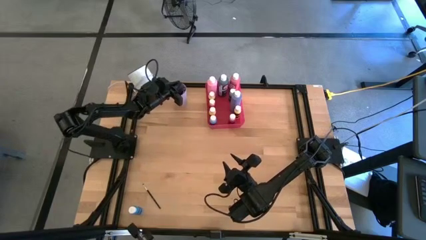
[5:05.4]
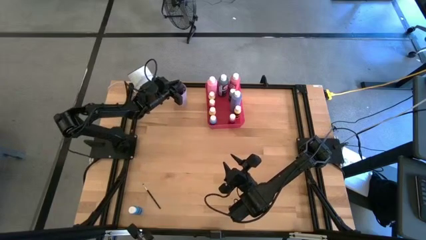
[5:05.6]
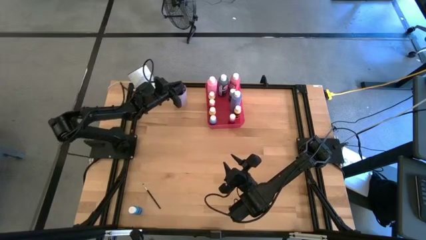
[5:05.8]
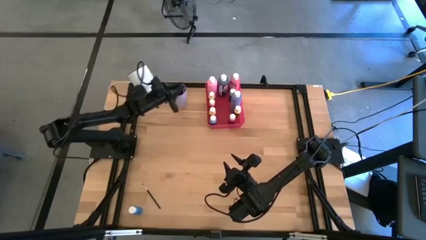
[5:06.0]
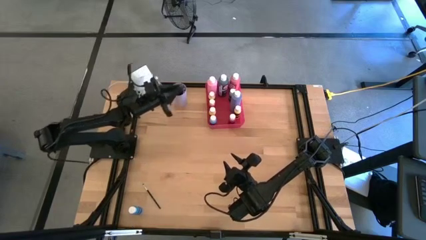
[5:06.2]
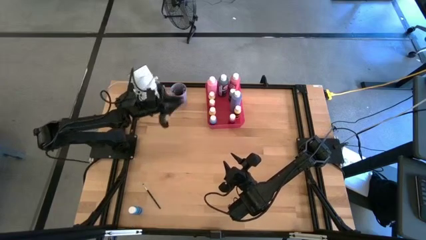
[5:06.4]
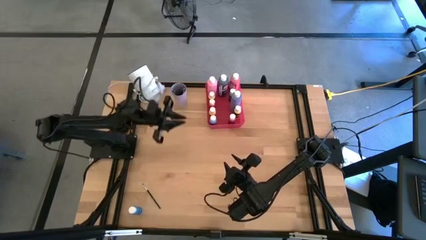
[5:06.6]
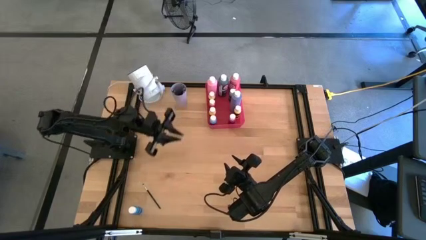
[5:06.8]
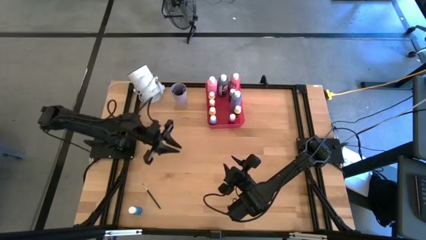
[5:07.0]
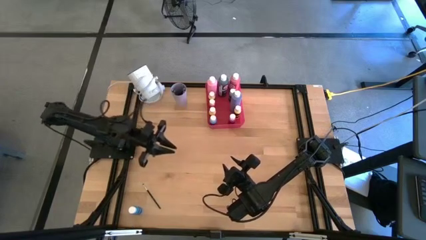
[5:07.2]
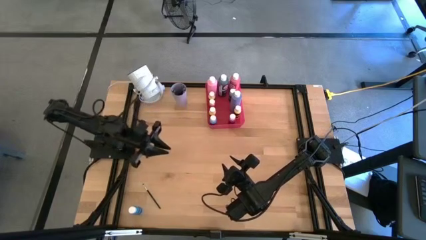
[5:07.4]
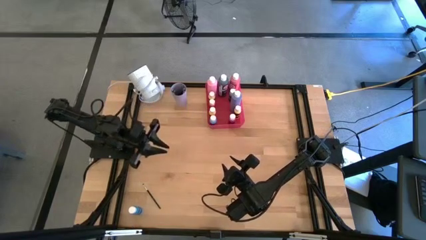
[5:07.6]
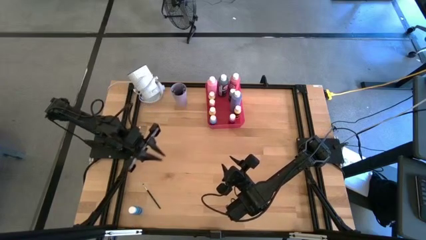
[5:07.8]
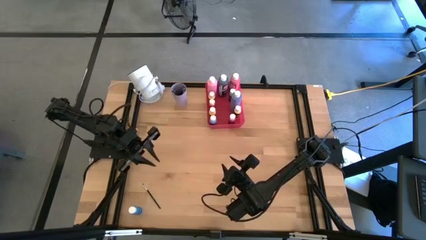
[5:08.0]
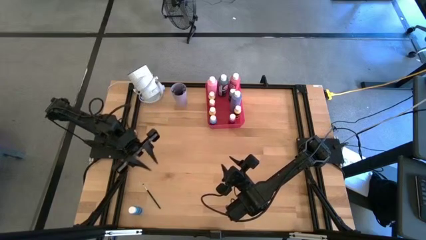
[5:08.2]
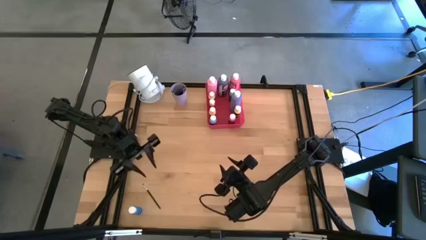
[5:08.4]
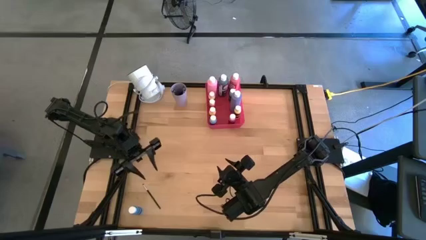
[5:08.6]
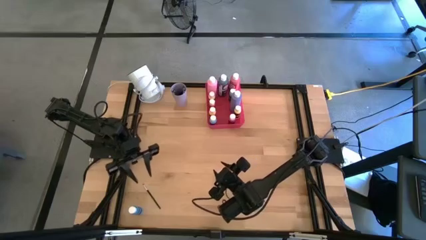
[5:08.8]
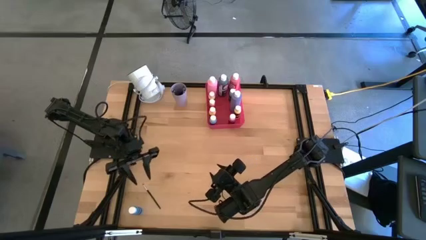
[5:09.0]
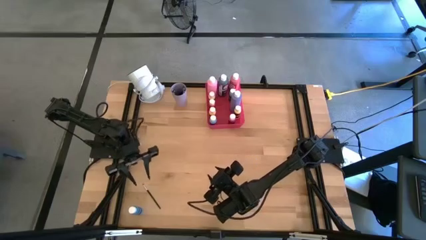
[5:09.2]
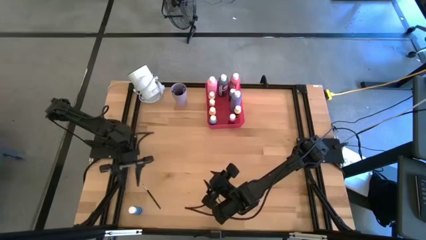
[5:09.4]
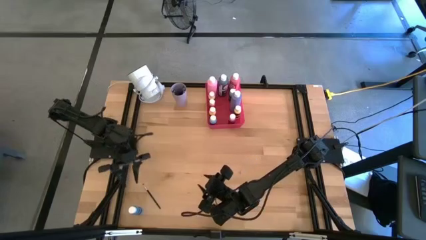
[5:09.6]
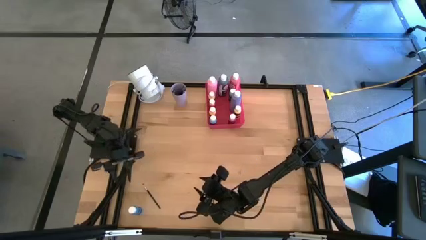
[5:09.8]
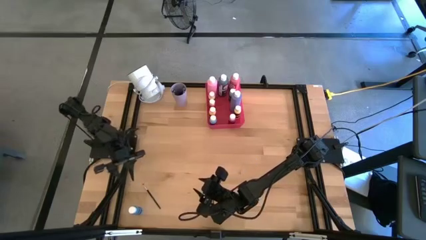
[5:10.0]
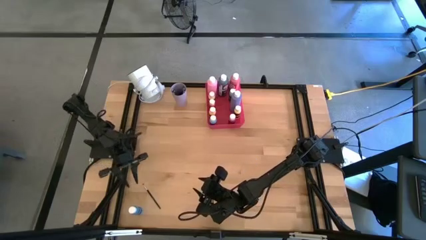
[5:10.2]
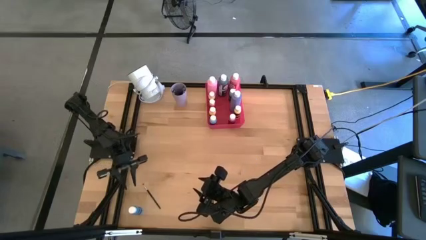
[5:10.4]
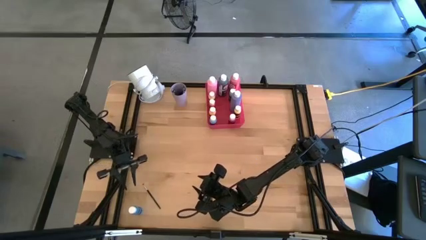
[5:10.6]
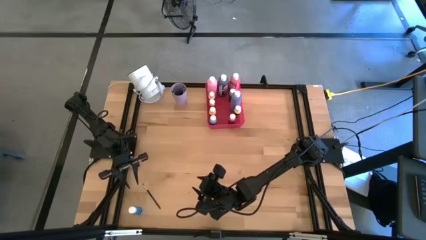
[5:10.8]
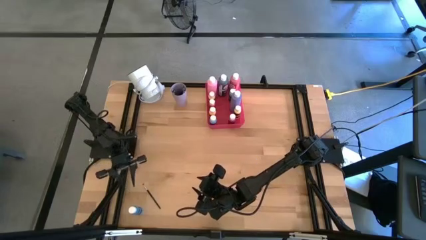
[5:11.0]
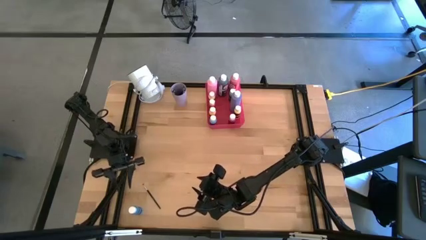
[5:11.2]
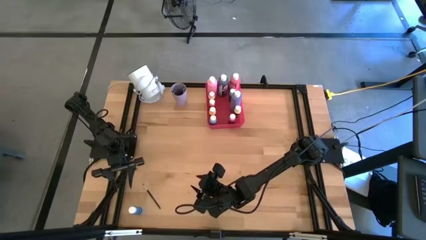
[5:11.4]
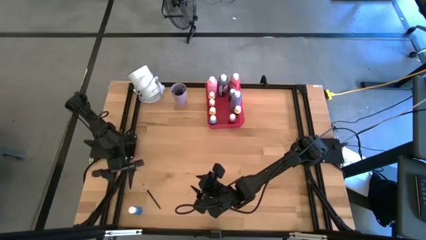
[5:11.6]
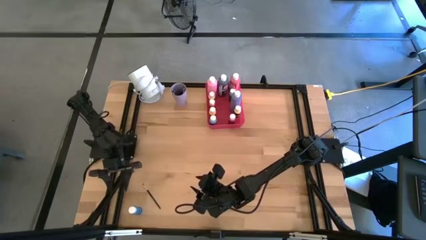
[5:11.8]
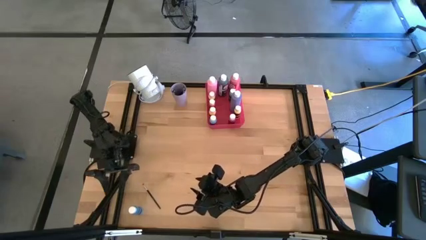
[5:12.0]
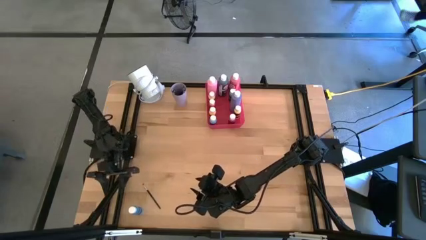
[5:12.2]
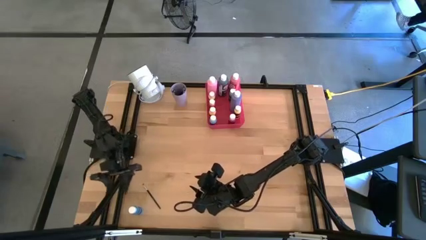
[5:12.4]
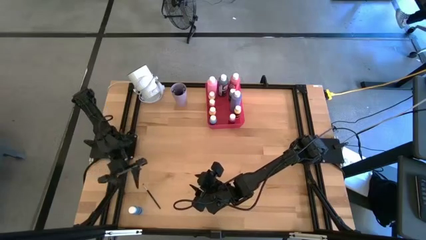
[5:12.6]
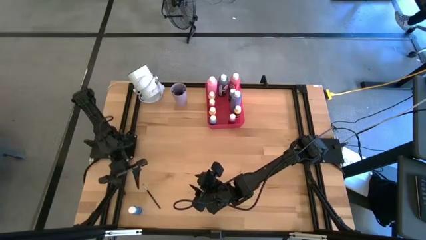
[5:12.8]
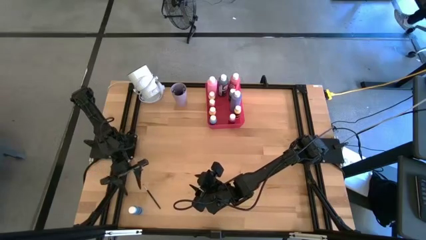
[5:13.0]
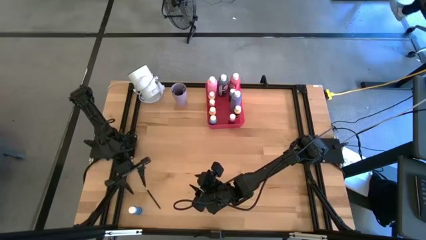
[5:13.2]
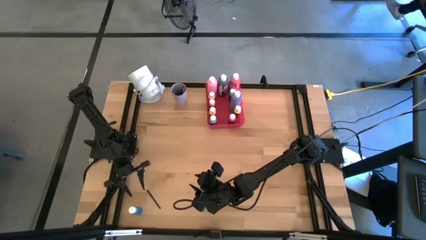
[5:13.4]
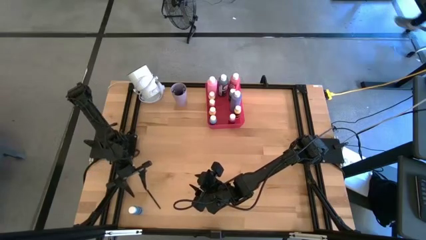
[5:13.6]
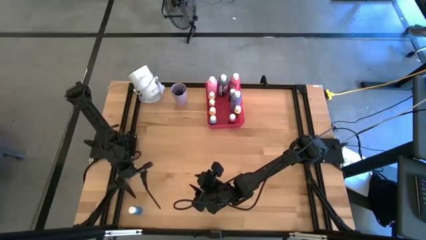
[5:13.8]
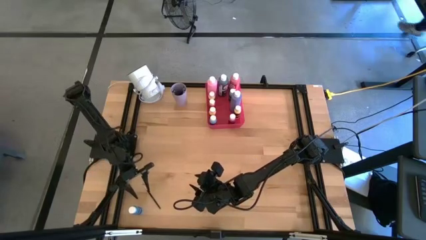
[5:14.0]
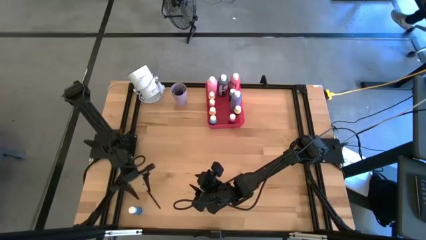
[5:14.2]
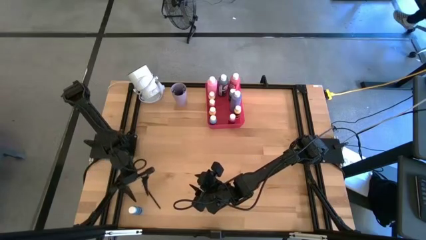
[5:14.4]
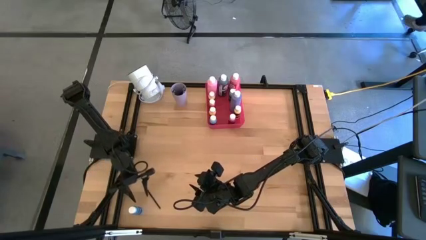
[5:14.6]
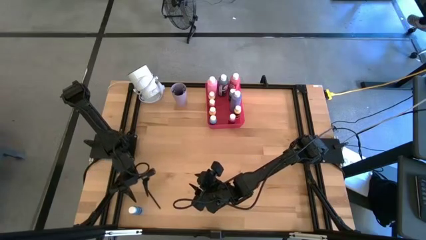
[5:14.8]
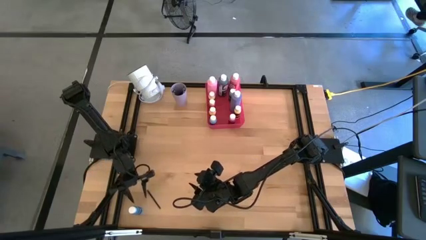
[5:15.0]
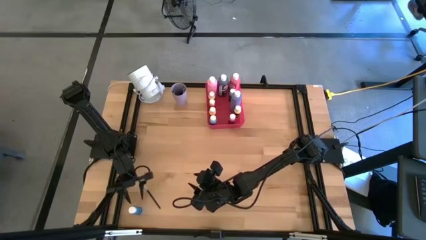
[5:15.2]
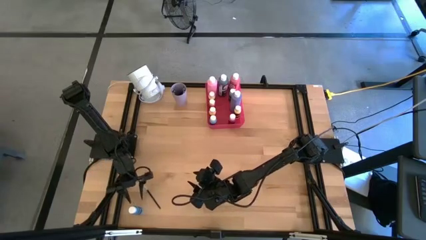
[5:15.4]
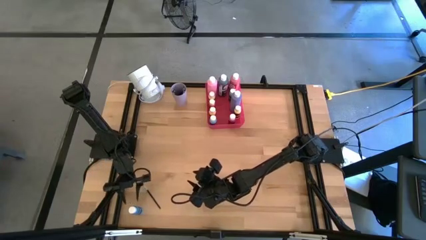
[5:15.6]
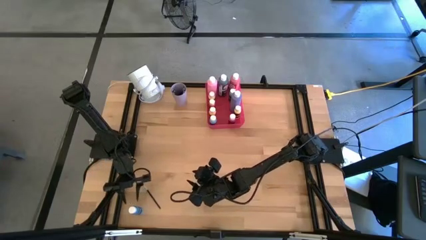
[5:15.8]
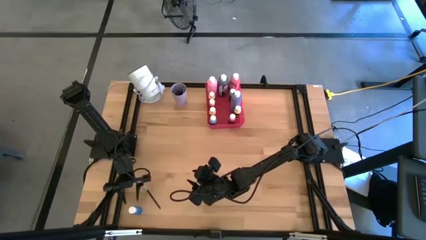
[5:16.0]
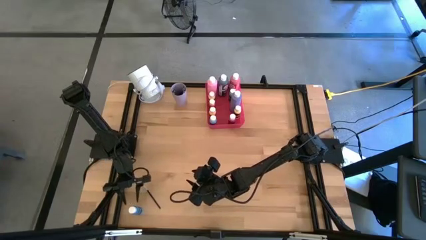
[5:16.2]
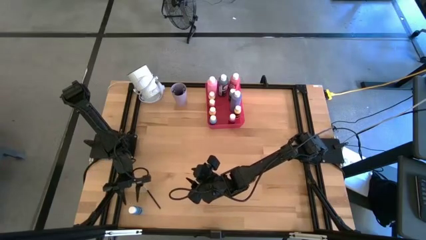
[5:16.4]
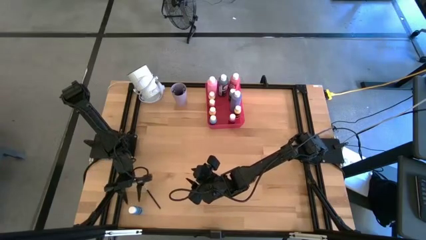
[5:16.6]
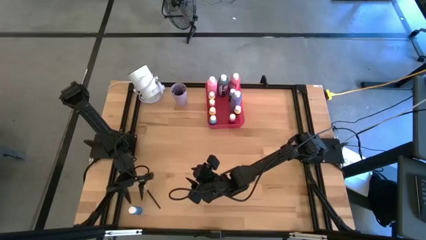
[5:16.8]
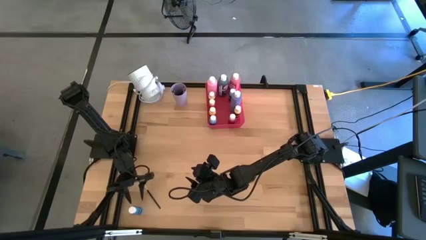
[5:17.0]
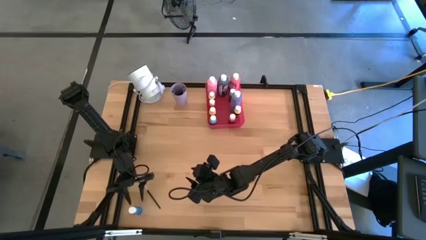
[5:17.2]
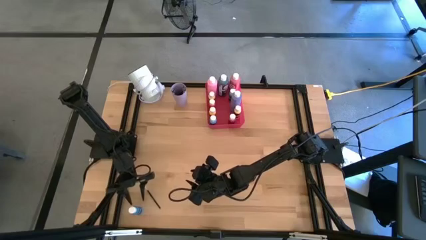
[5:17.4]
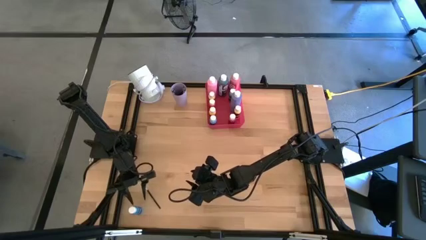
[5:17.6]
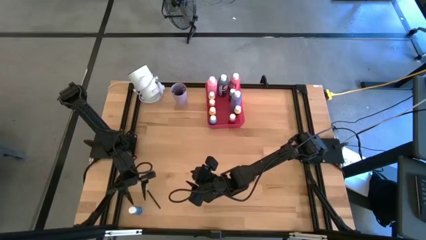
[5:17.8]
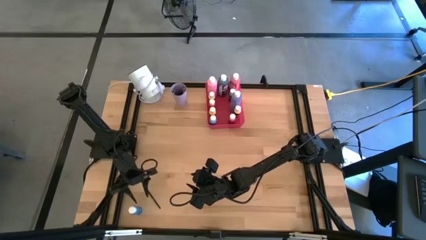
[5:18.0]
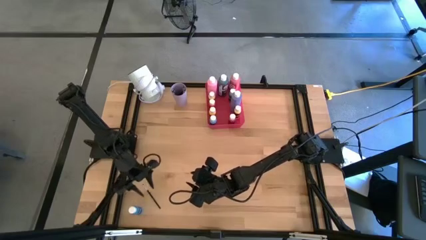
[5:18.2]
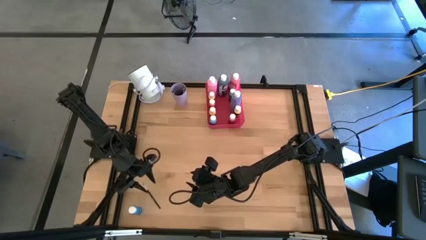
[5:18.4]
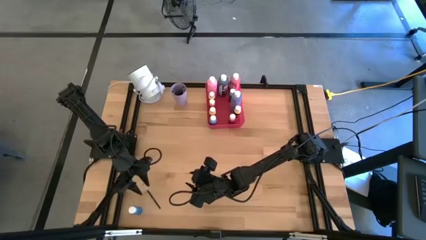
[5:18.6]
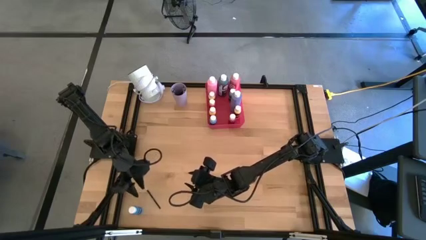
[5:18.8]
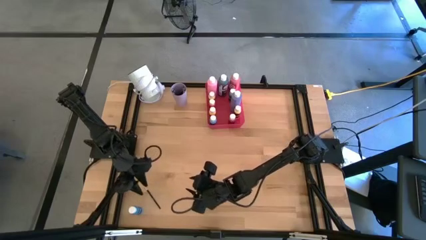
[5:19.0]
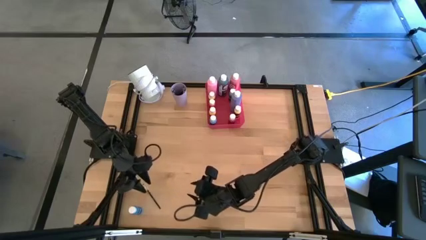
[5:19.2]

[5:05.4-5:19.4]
Task: Pick & Place Paint Supplies
Put the blue paint bottle into the red bin

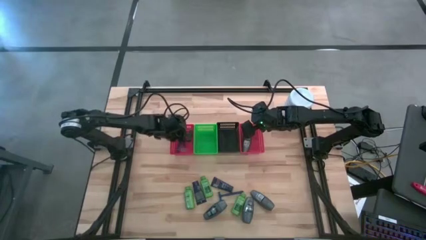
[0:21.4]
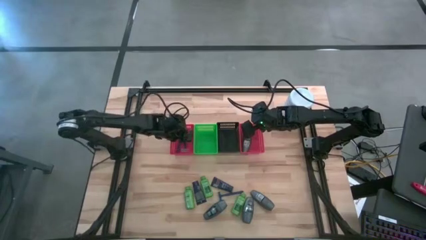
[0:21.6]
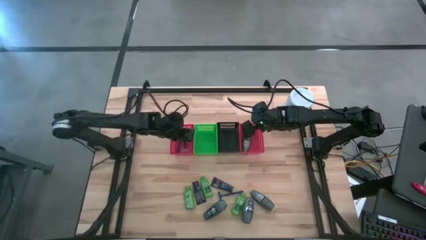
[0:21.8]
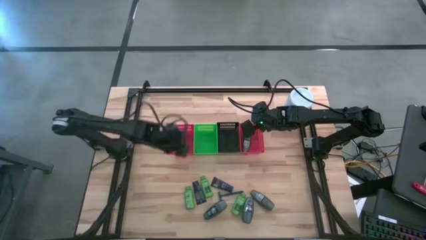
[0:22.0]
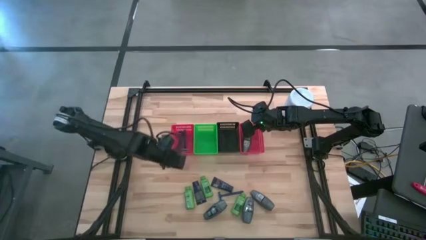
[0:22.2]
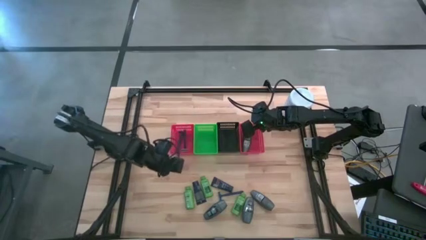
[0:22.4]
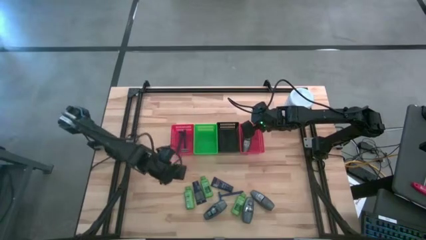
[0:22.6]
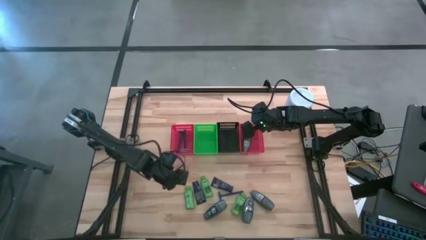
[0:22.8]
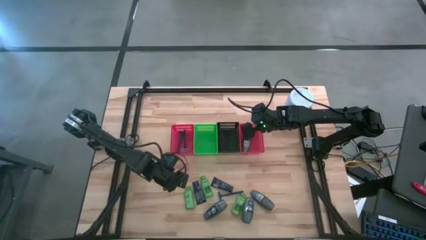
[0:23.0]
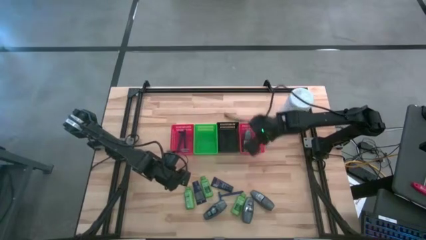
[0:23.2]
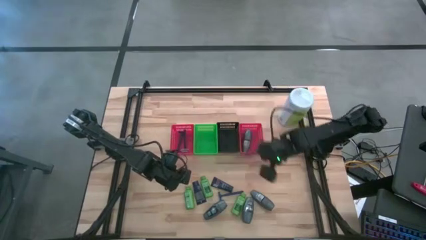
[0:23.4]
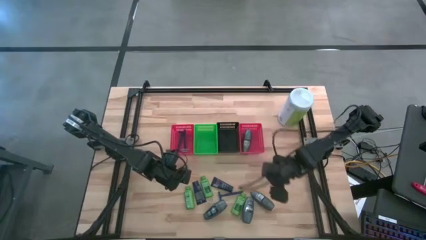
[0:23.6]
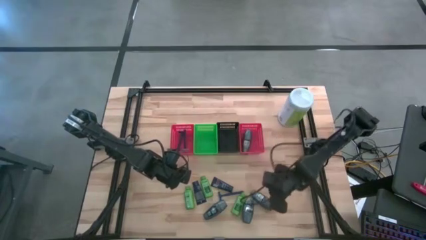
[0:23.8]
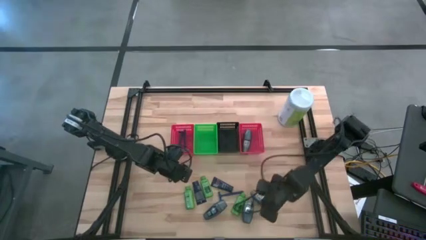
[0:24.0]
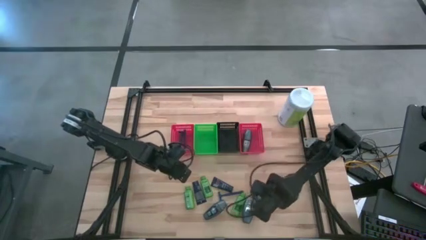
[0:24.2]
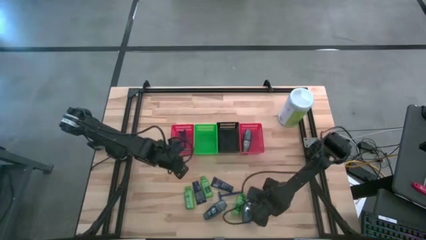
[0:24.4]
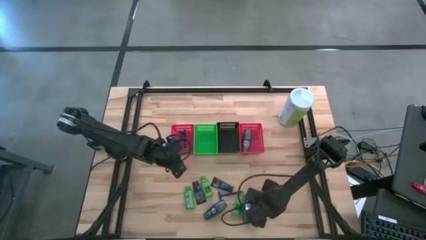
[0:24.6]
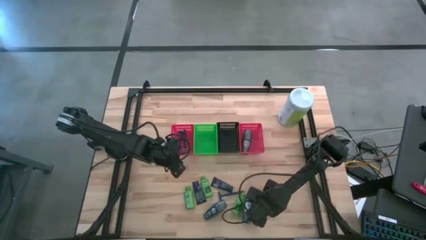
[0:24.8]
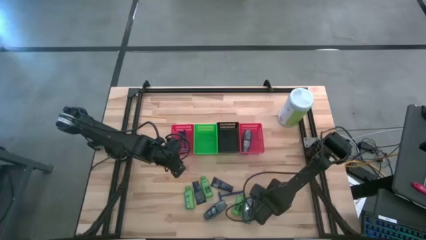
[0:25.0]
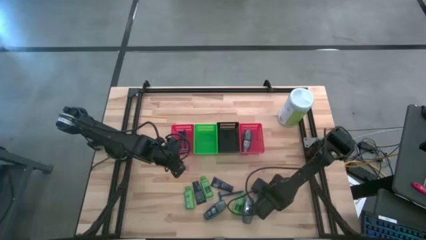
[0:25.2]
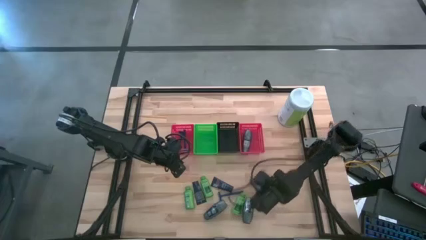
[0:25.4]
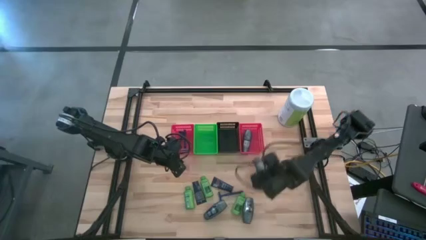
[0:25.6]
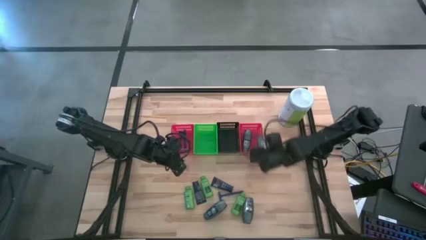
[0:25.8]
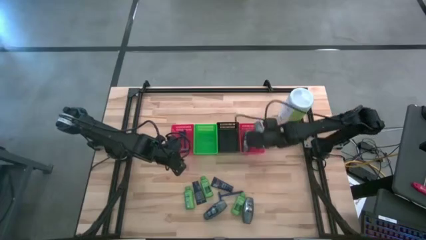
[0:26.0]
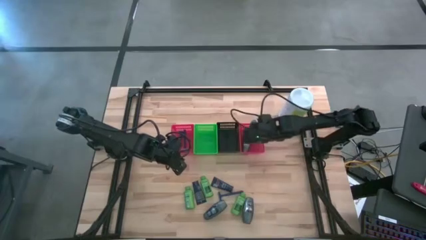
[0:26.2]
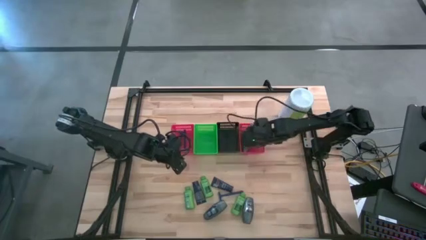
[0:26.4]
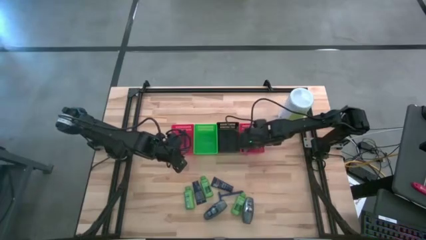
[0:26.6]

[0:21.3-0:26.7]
Task: Pick & Place Travel size toiletries
Put the black deodorant into the right red bin
